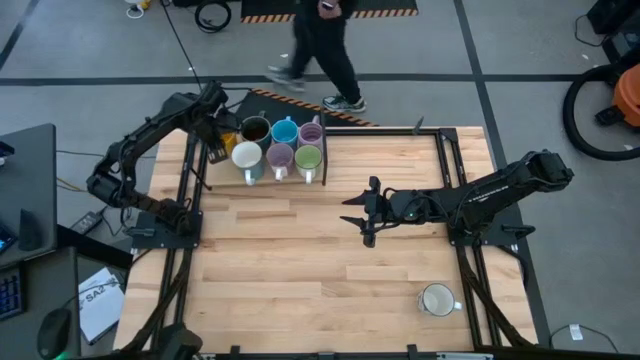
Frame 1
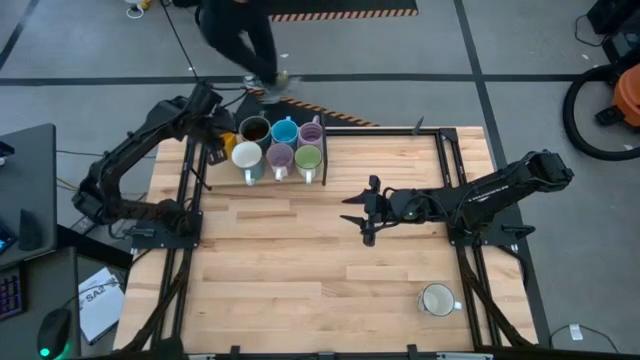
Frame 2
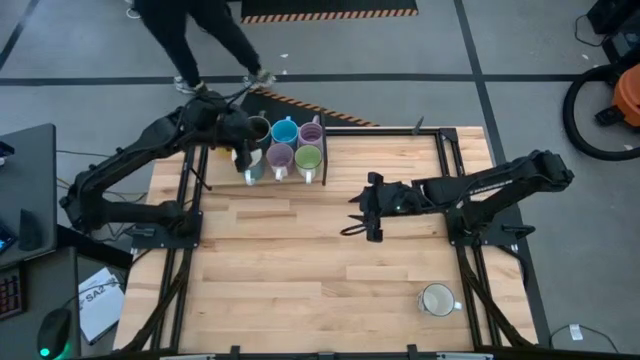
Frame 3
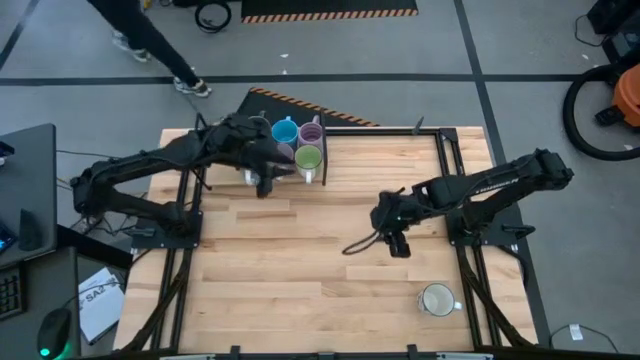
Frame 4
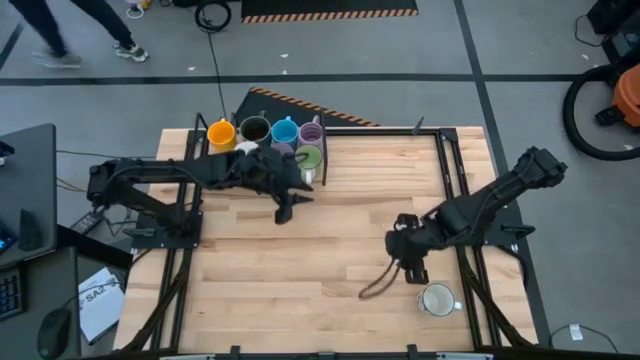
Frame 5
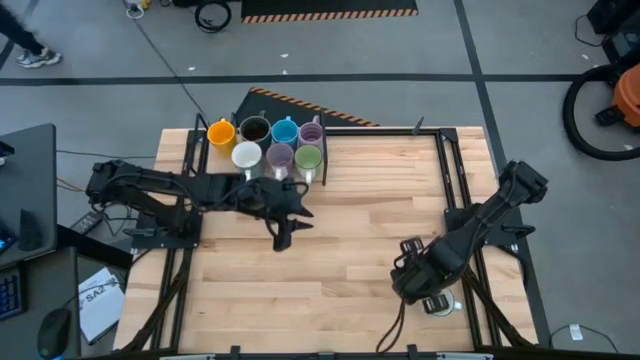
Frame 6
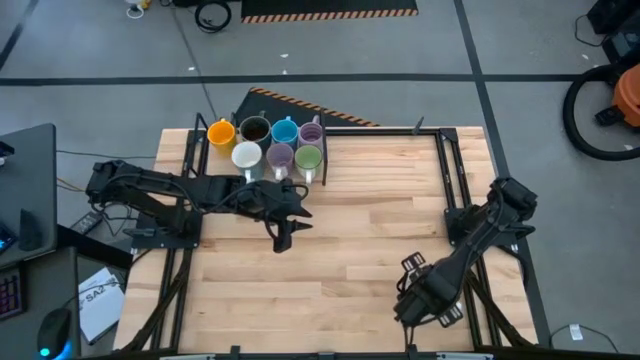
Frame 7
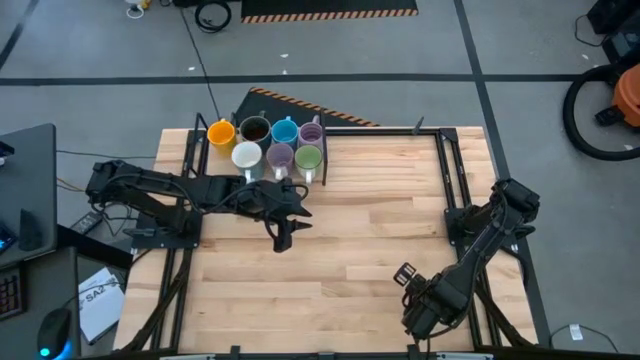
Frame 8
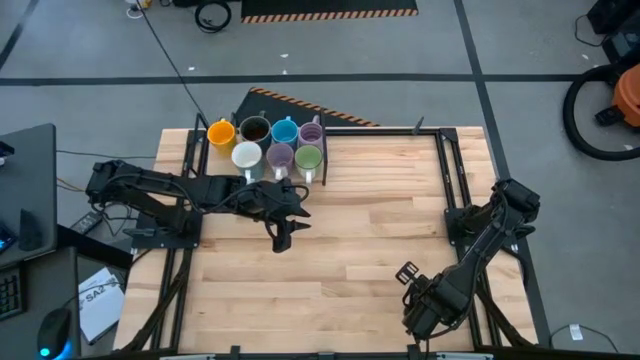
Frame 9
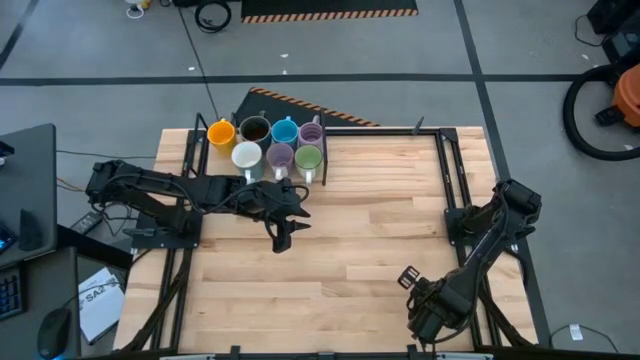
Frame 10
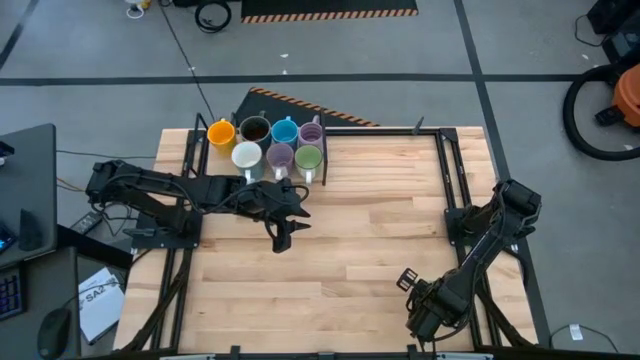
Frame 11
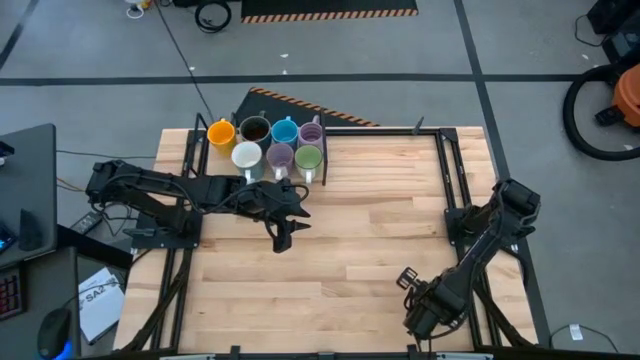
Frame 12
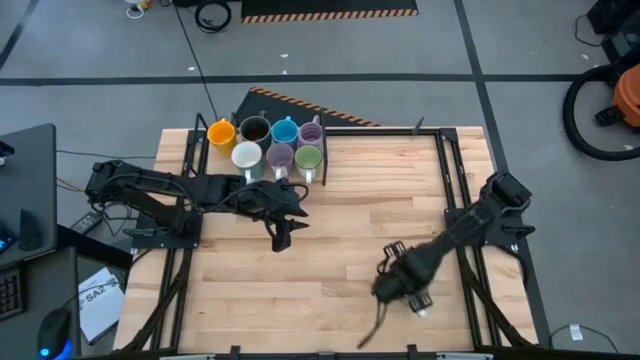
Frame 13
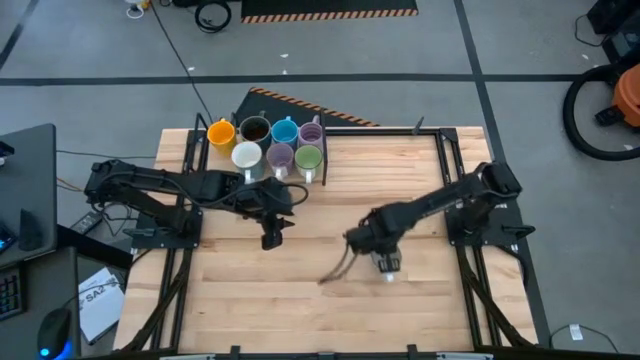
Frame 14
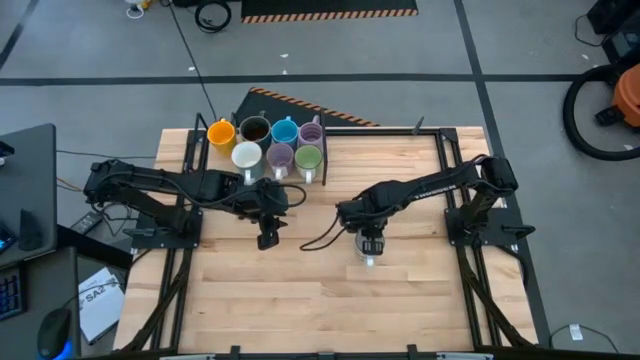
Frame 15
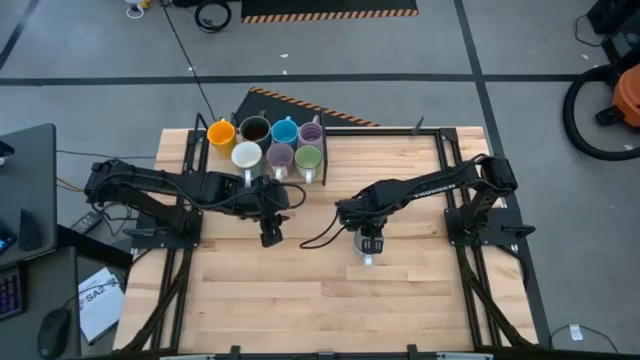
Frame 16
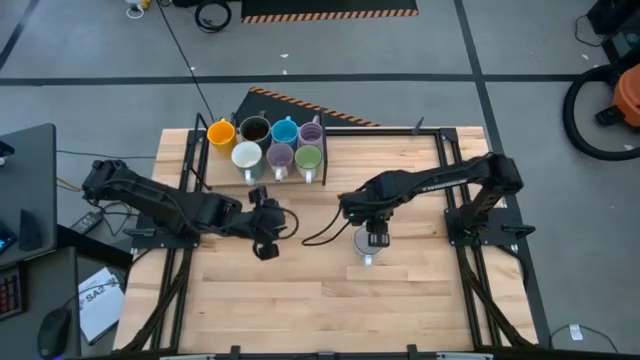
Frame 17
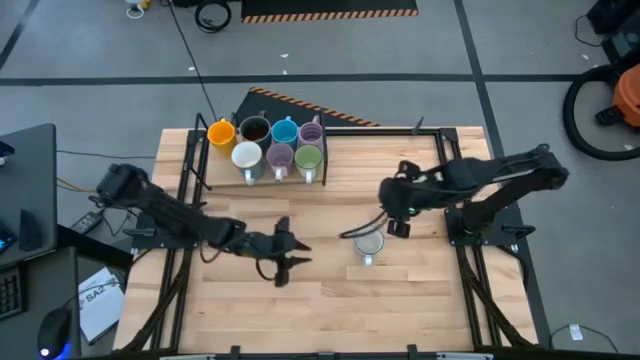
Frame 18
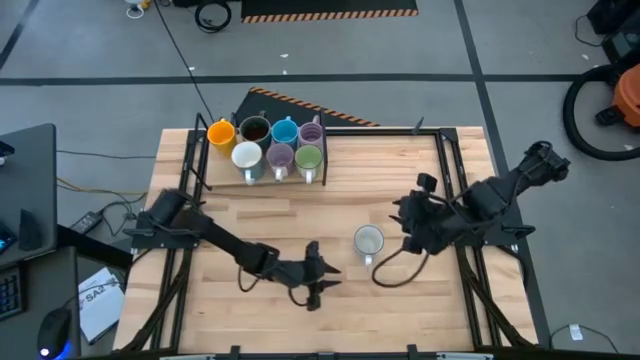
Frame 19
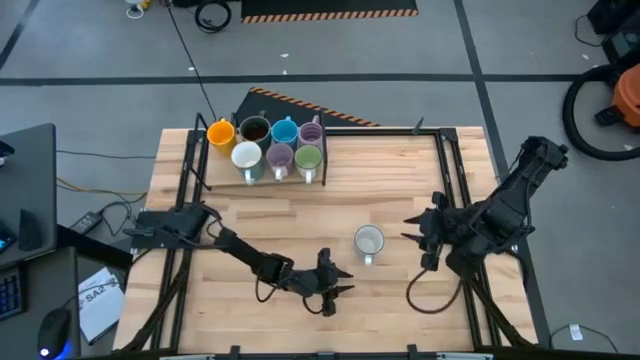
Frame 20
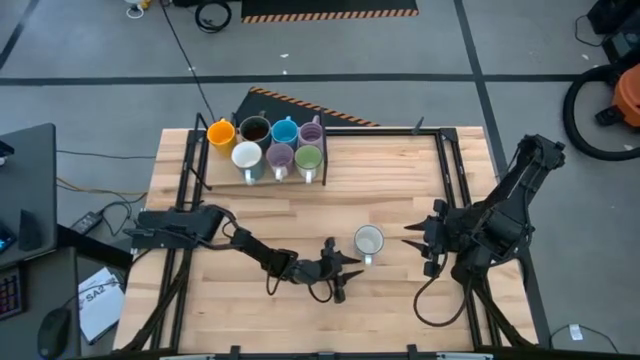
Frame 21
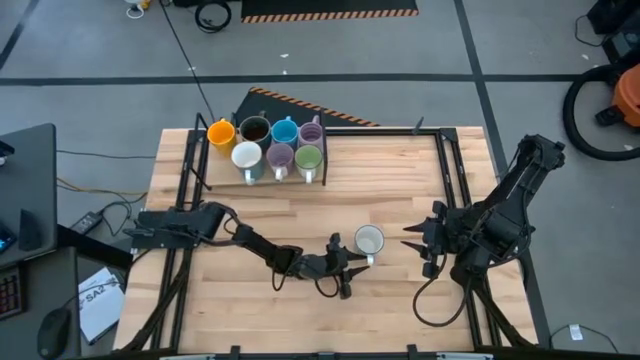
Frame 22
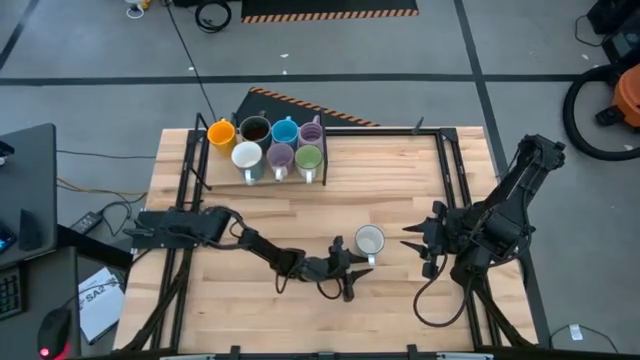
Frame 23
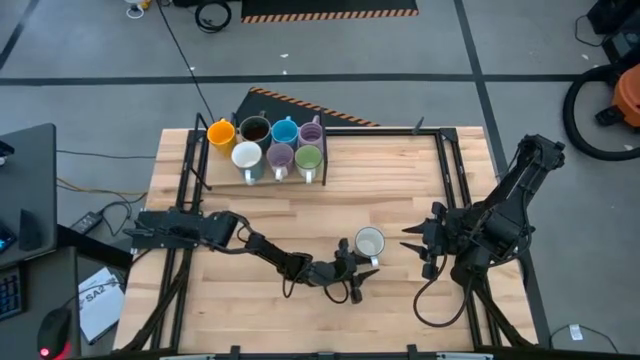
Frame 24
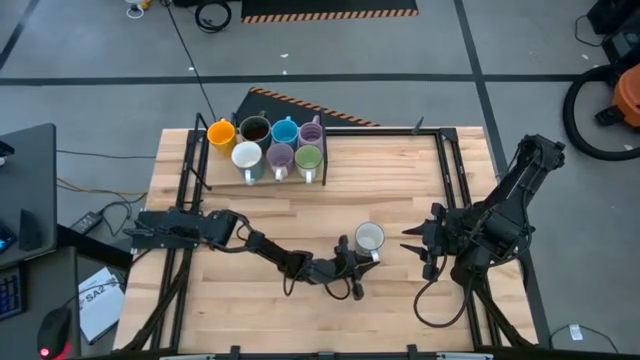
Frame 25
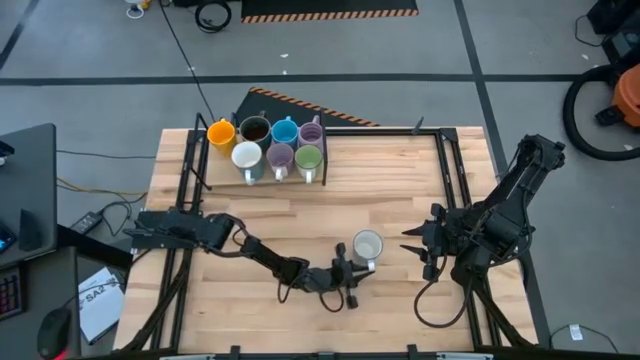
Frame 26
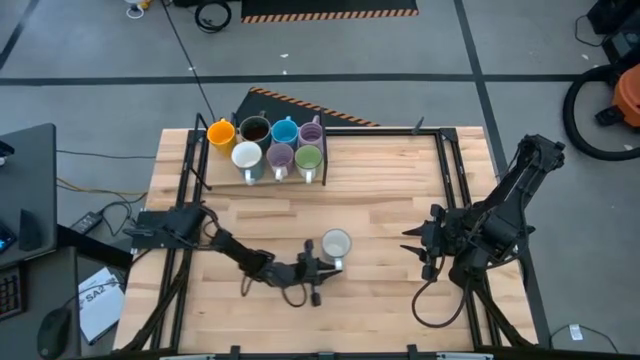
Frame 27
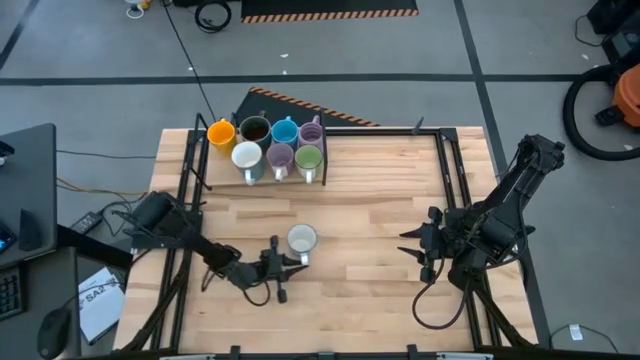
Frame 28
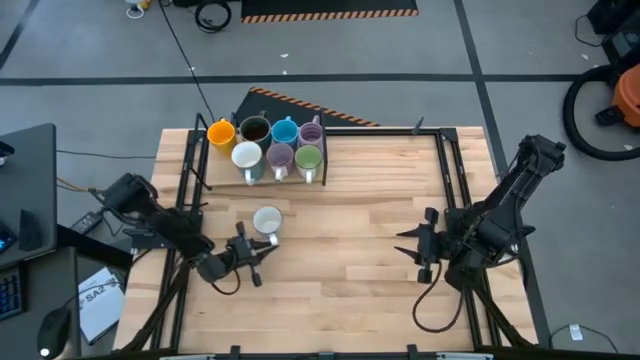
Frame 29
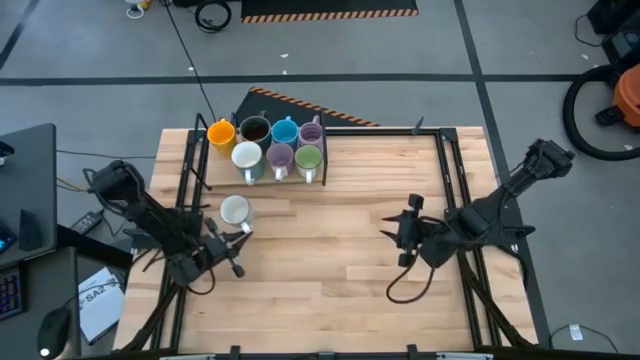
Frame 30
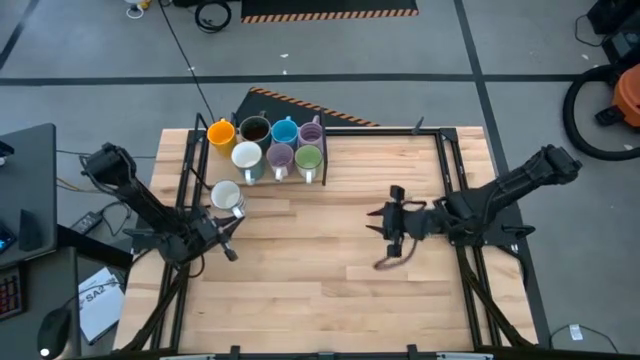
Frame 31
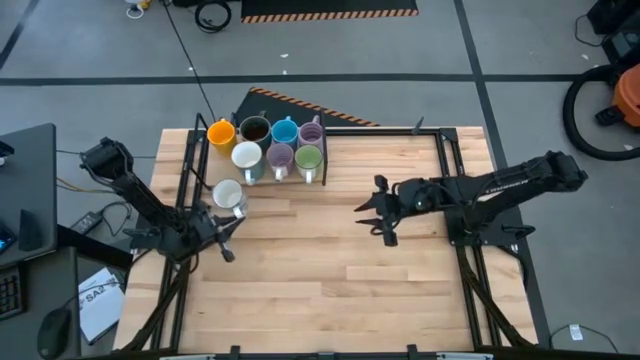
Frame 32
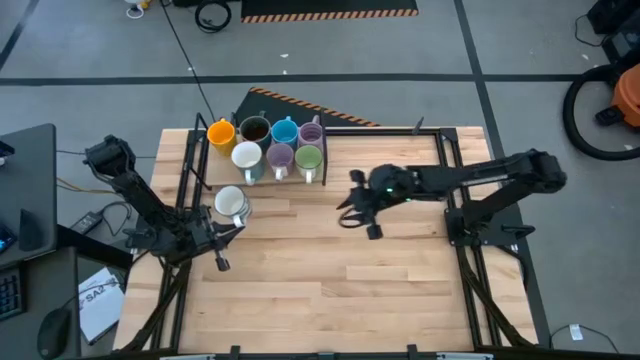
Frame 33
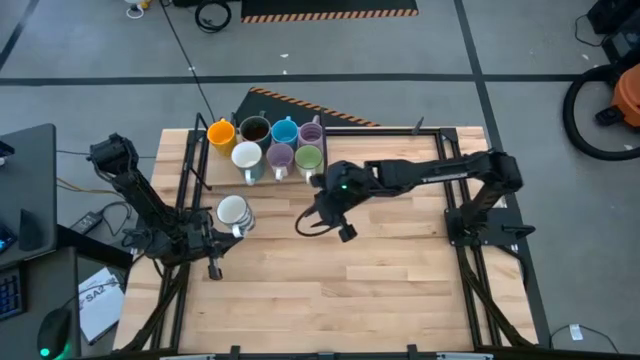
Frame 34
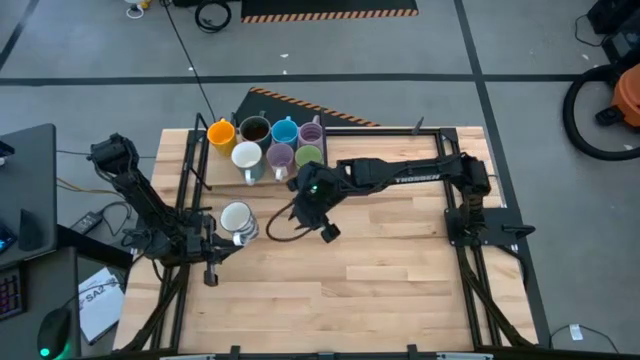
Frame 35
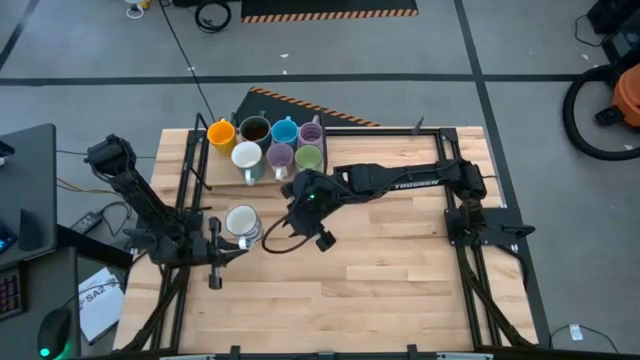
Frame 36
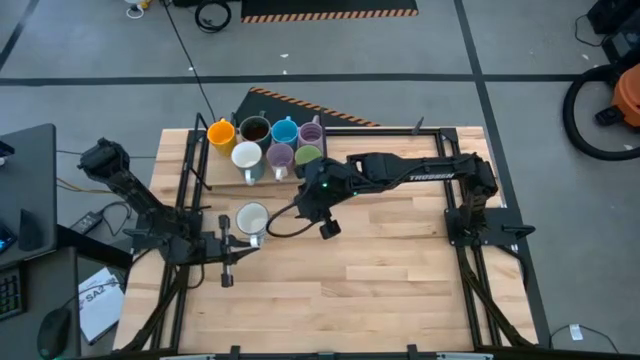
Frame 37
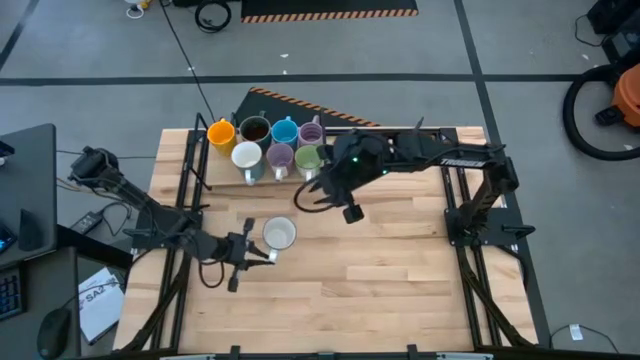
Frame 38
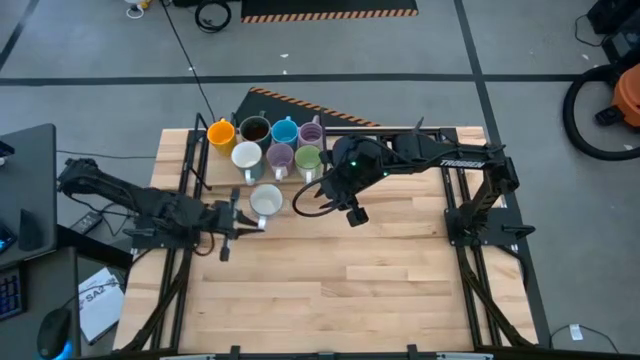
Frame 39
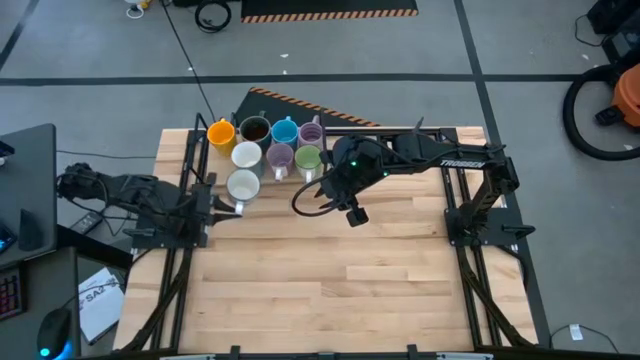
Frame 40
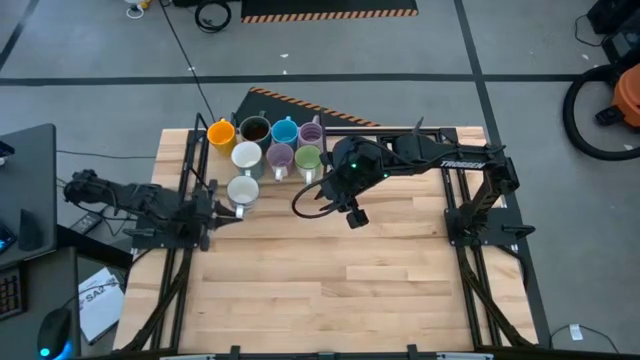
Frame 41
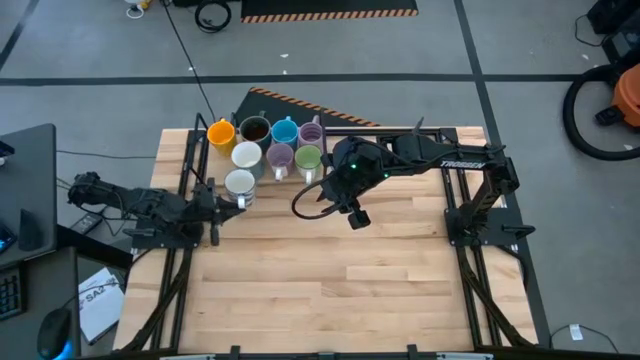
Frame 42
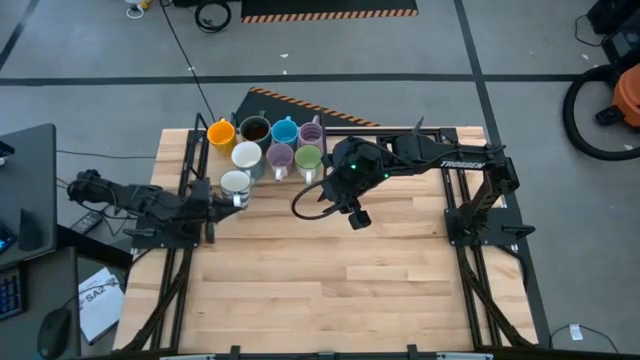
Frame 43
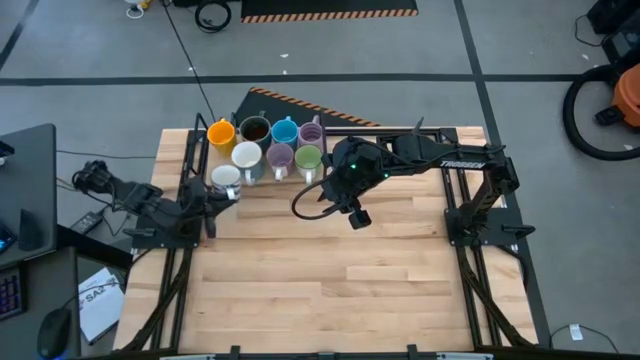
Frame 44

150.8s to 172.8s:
Task: Place coffee mugs
Put the blue patterned mug on the shelf
